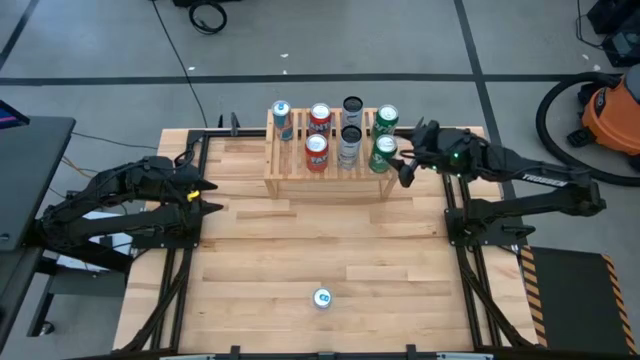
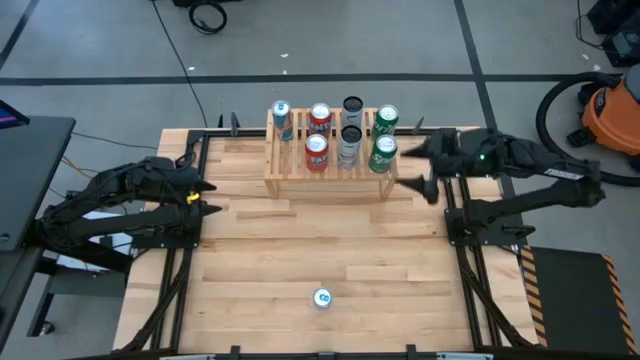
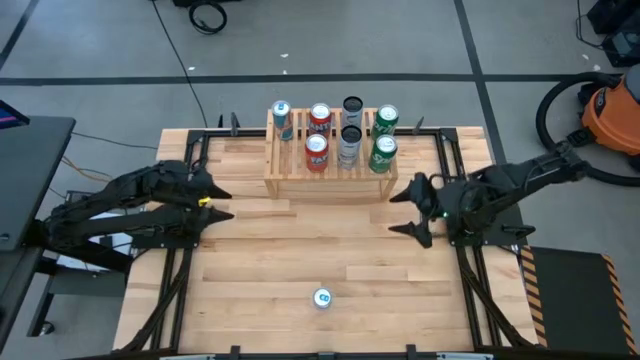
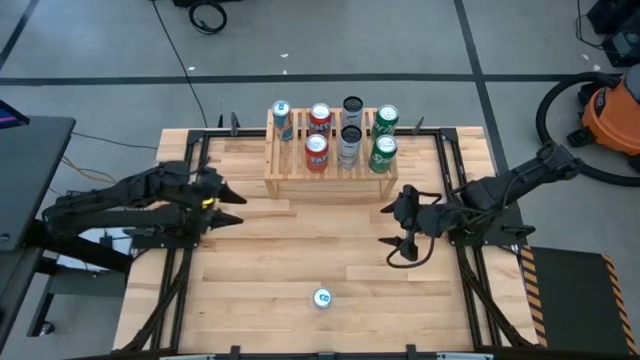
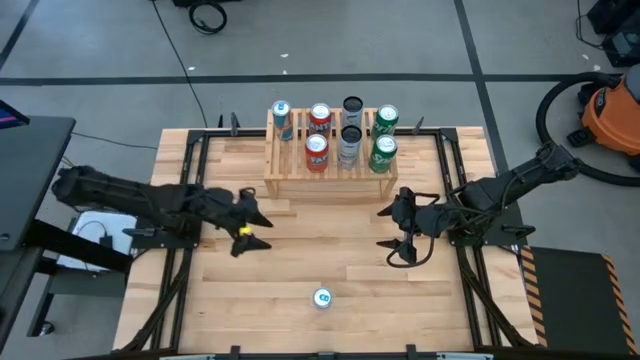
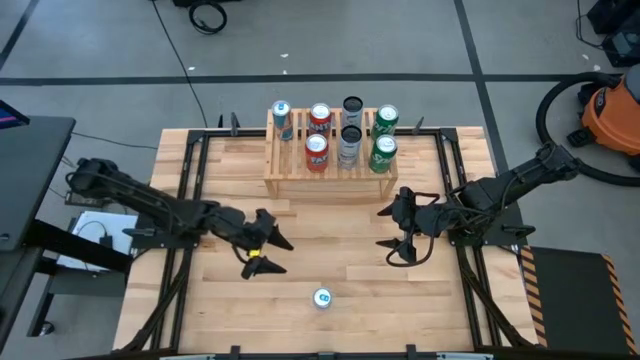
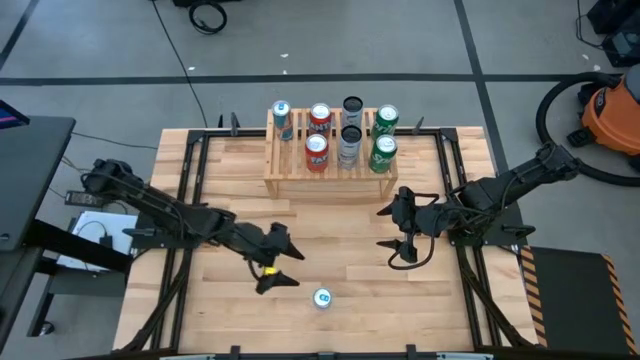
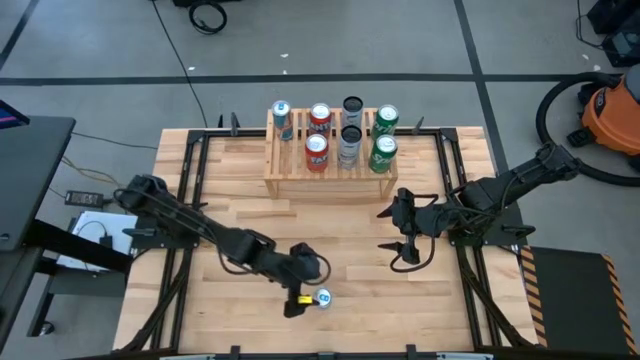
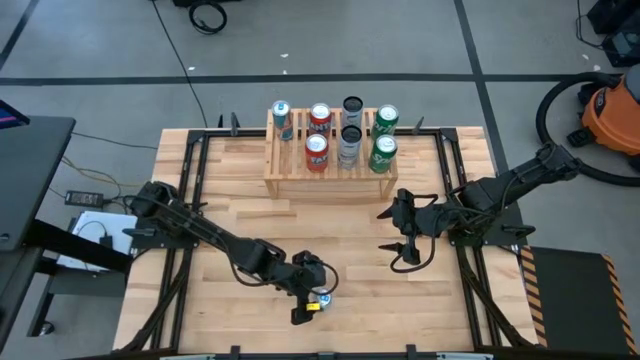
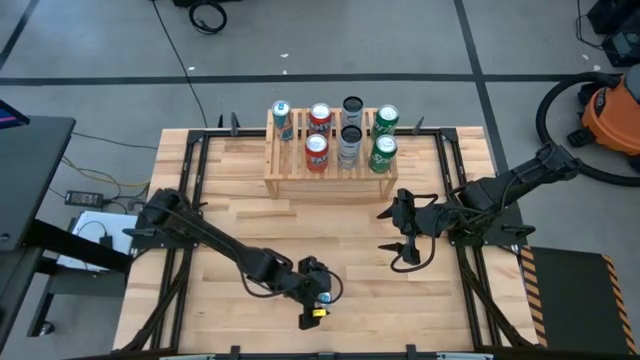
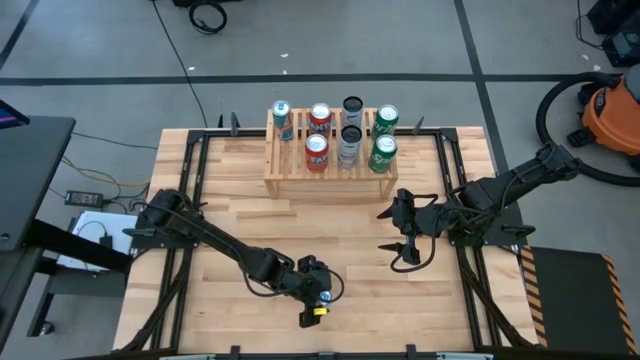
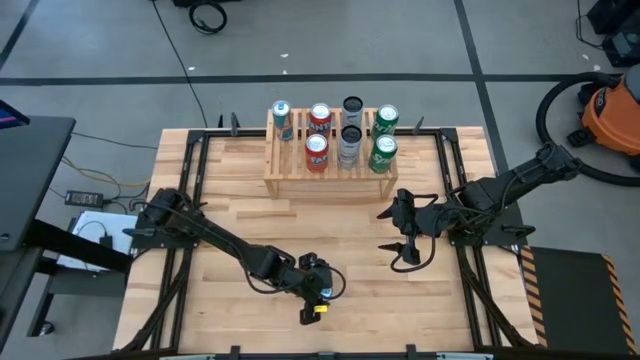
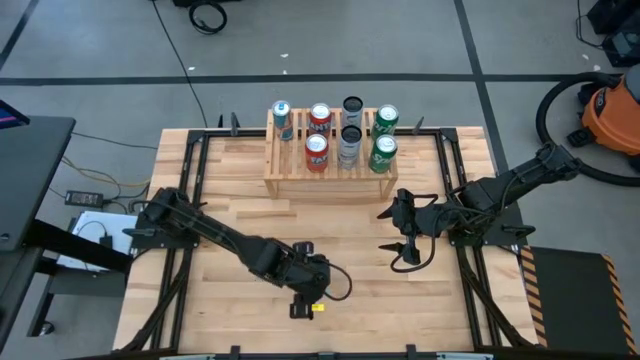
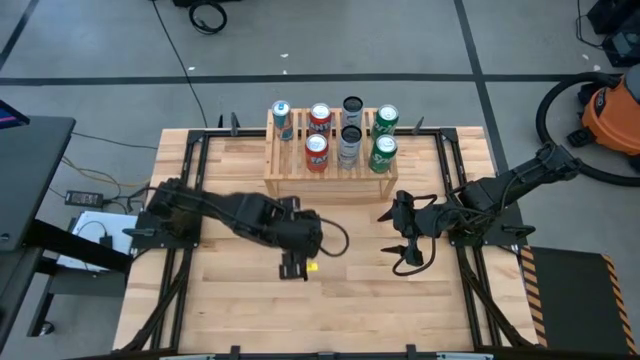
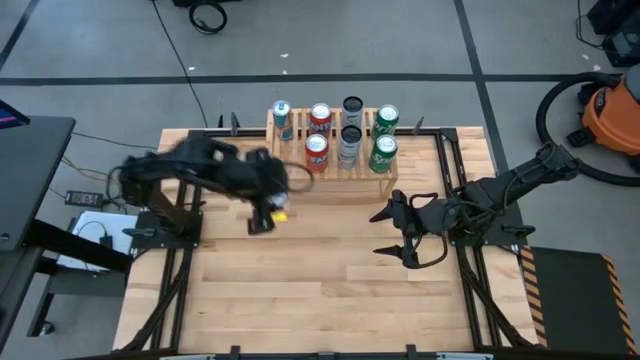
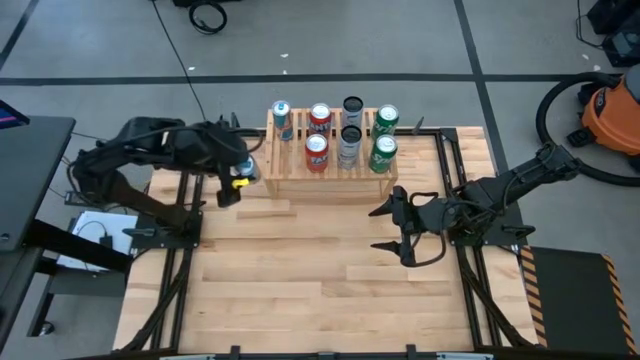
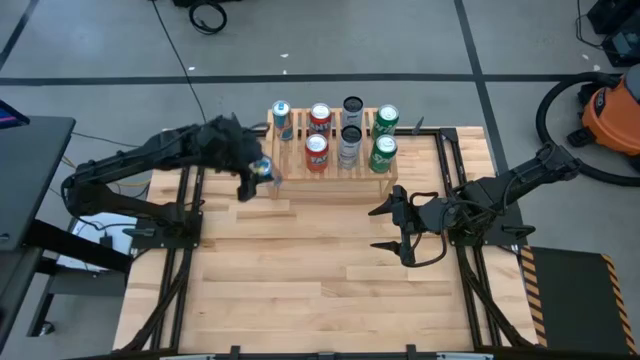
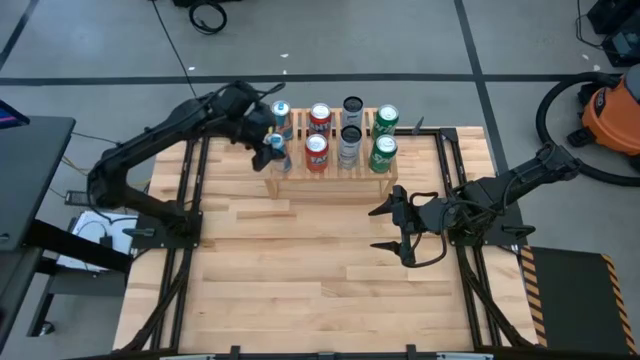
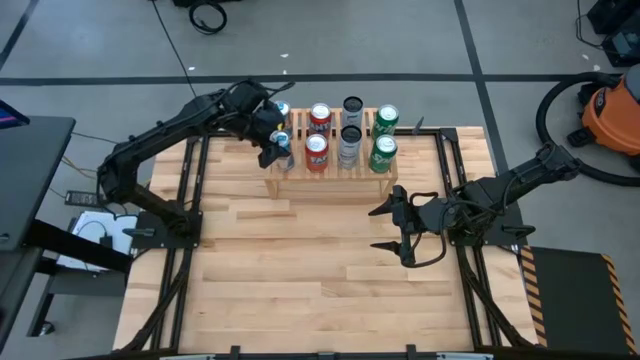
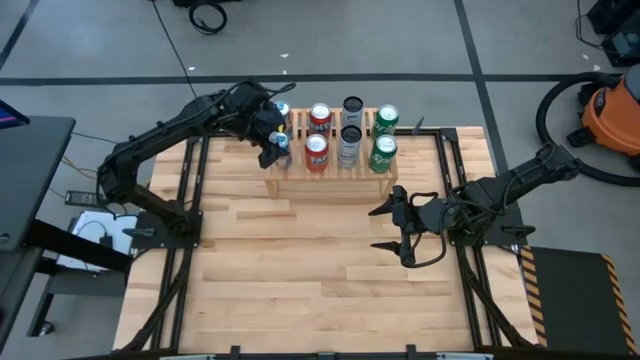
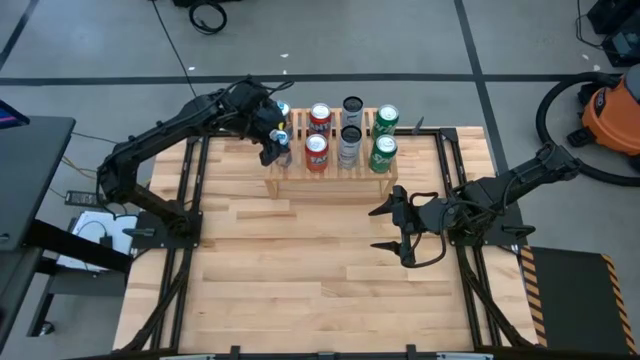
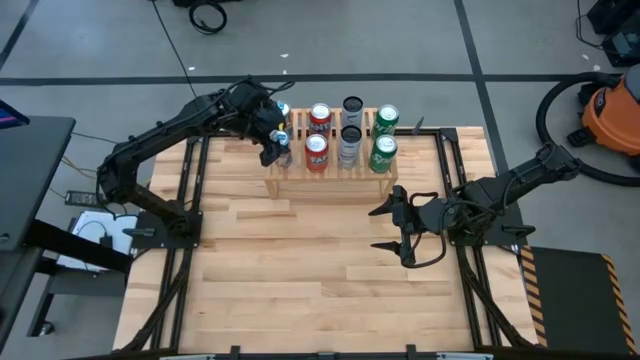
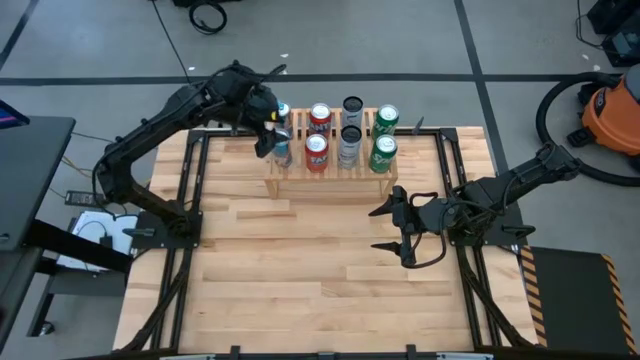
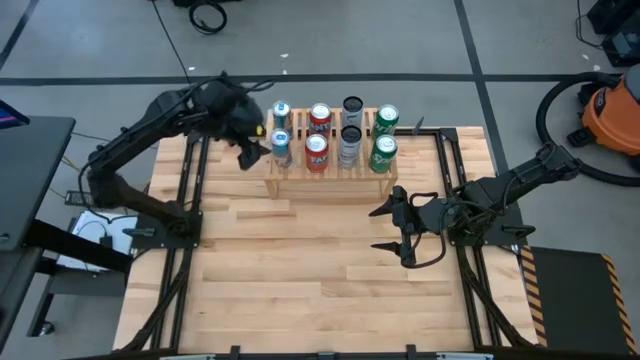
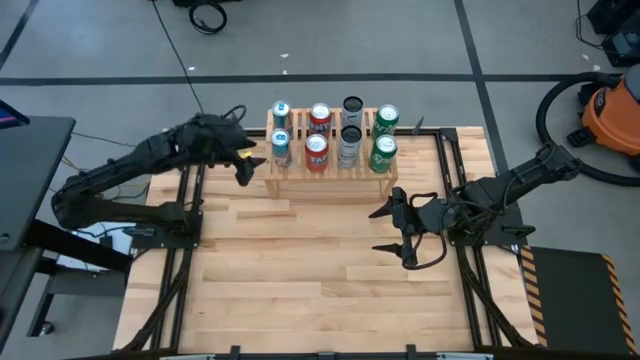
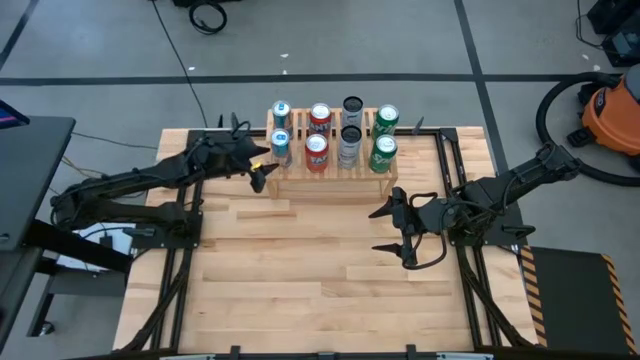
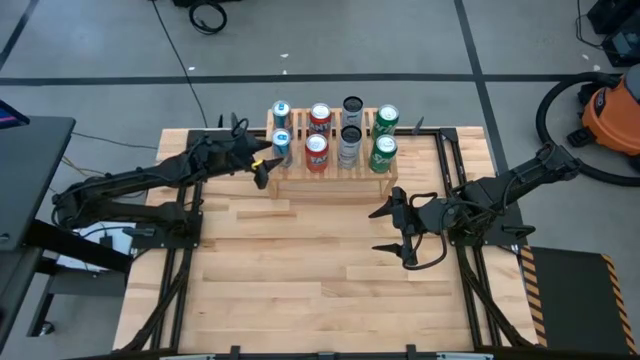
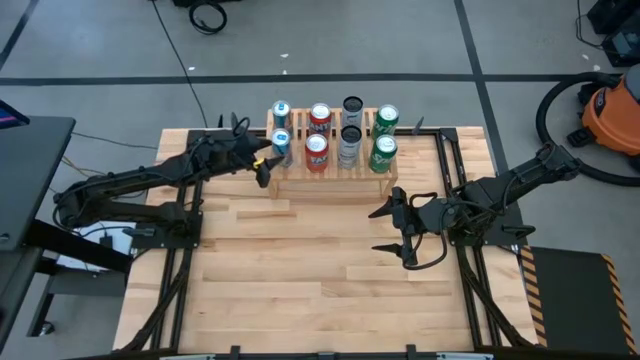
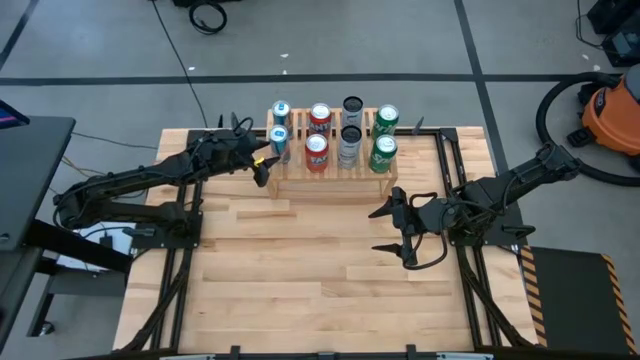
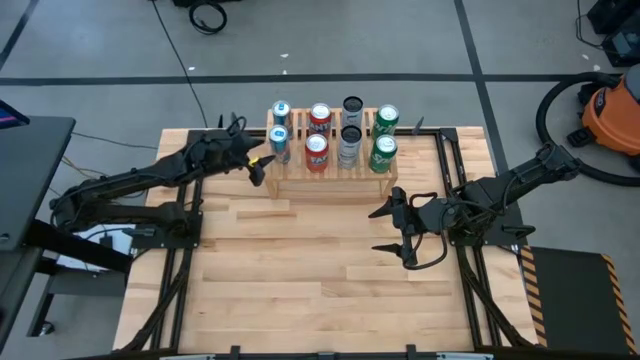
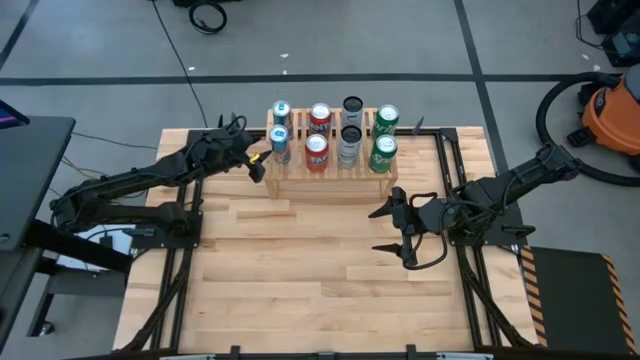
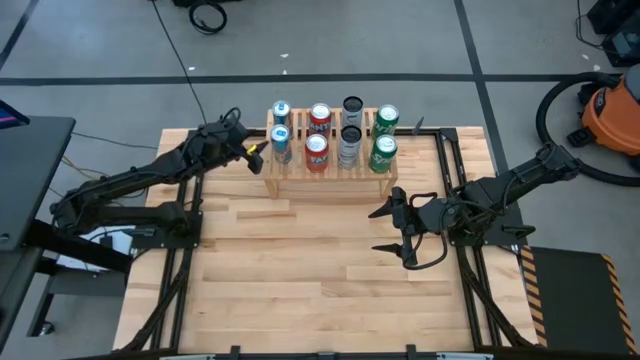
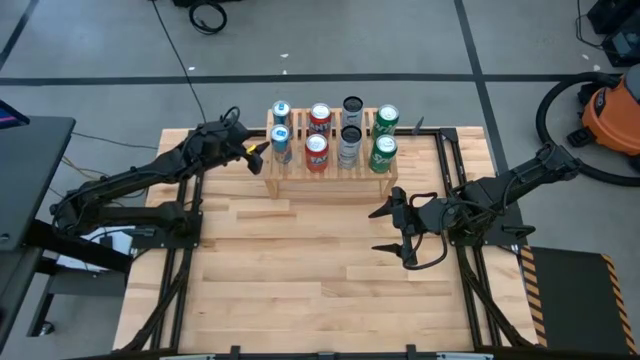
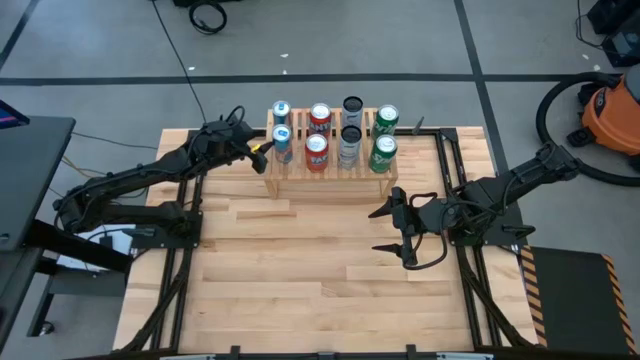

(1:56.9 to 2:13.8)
Task: Place canned beverage on shelf
Put the blue soda can on the shelf aligned with the other blue soda can

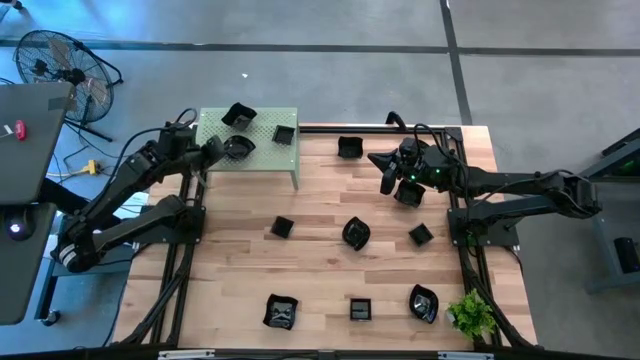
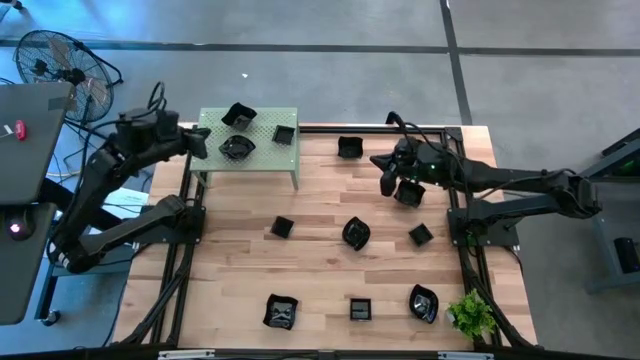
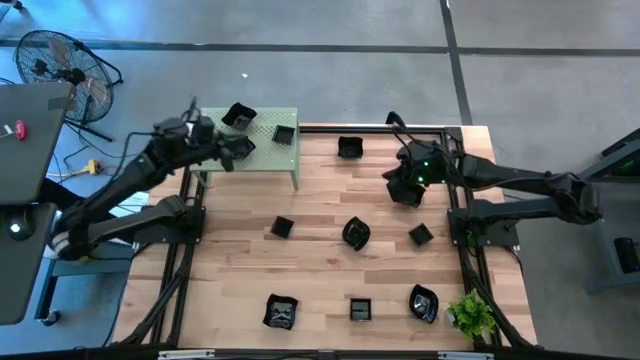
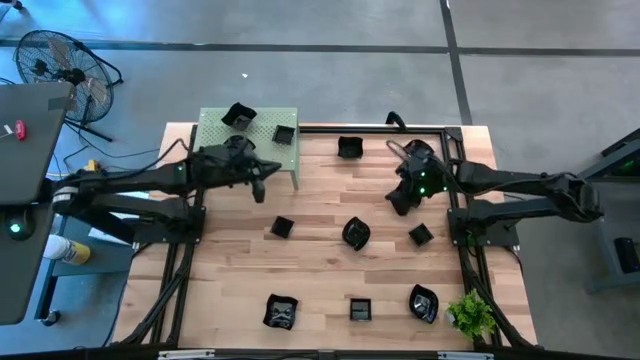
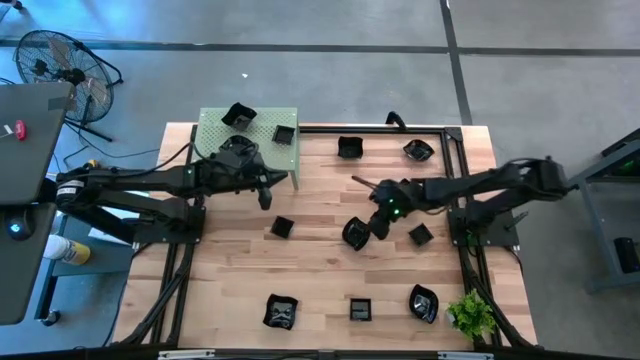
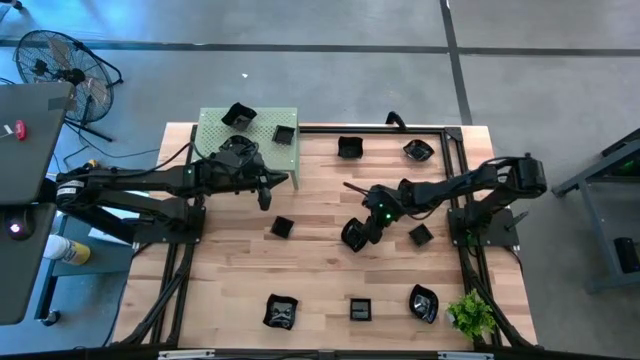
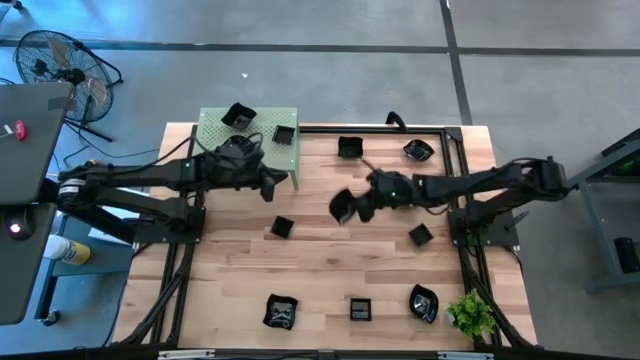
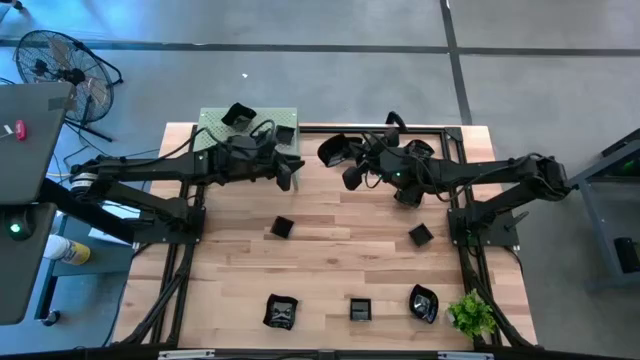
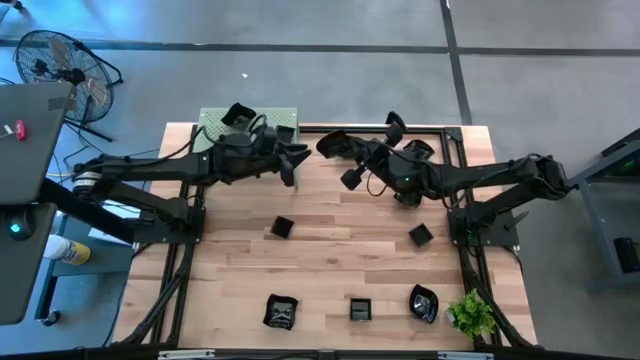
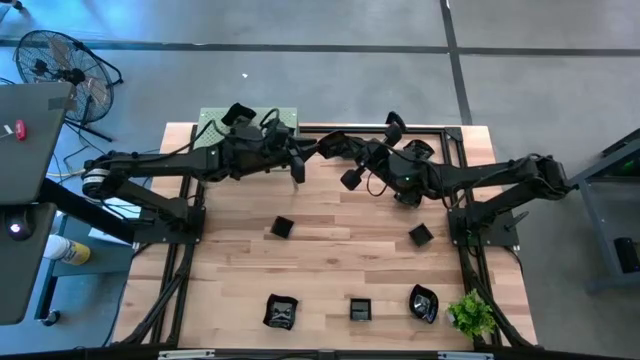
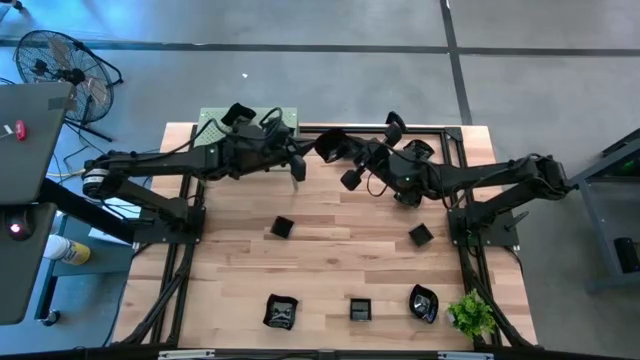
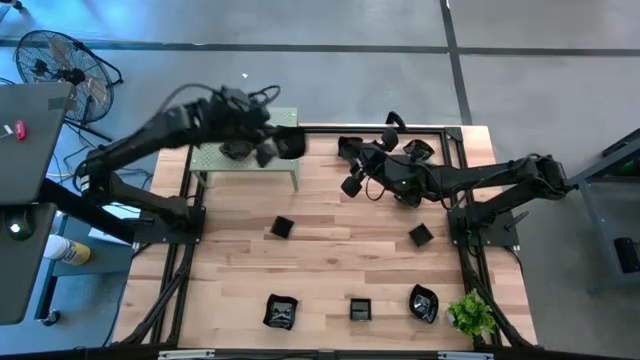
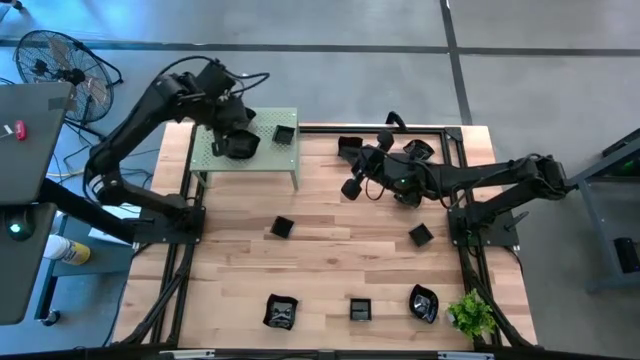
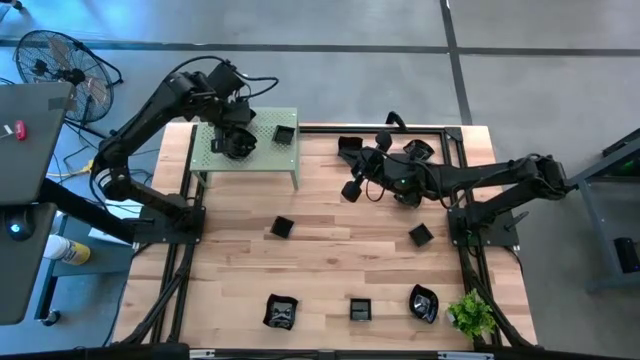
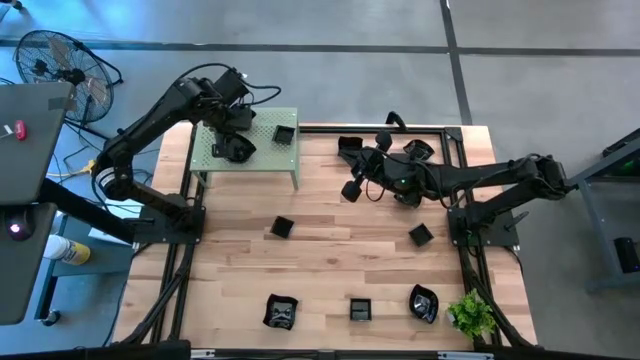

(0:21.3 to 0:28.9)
Task: Pick & Place Mini shaped plates
Stack the black leaf-shaped plate on top of the black leaf-shaped plate on the shelf
